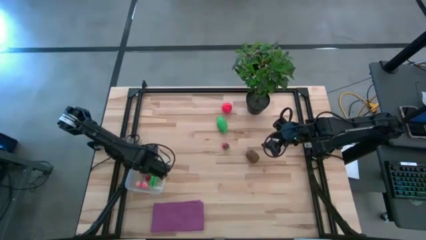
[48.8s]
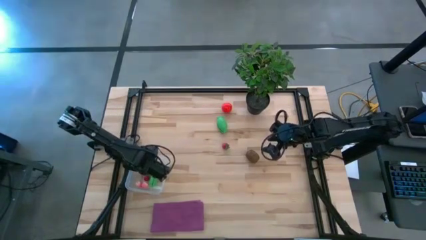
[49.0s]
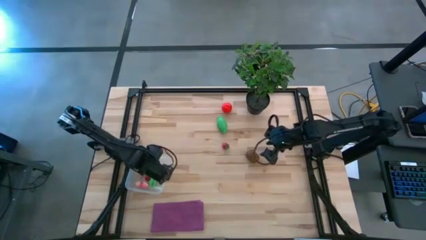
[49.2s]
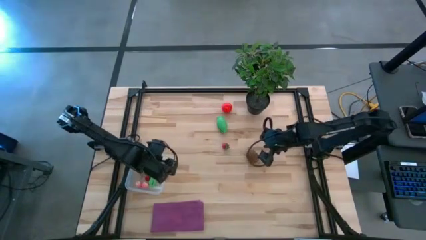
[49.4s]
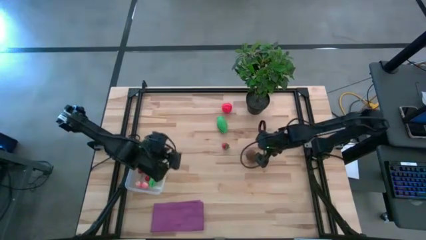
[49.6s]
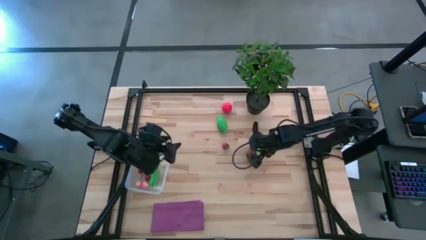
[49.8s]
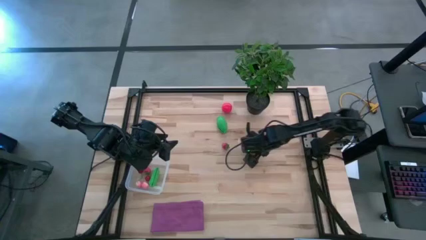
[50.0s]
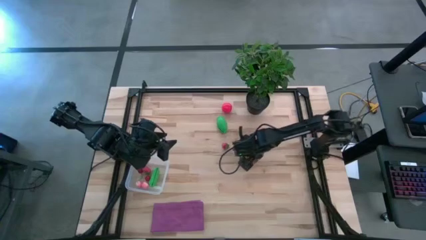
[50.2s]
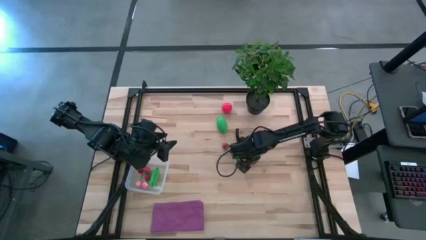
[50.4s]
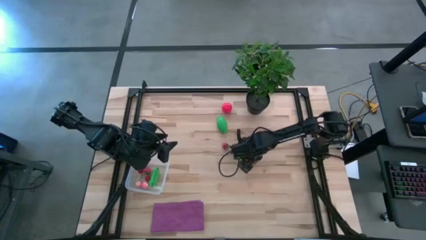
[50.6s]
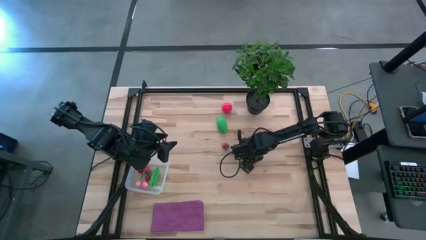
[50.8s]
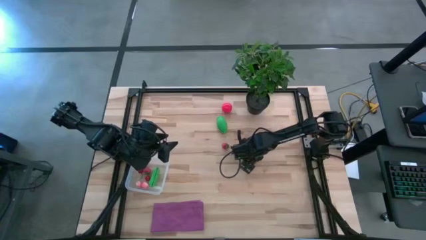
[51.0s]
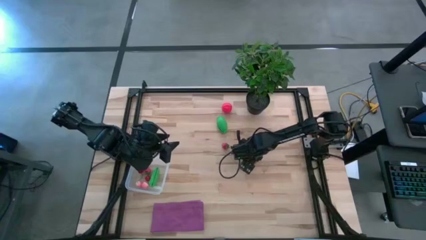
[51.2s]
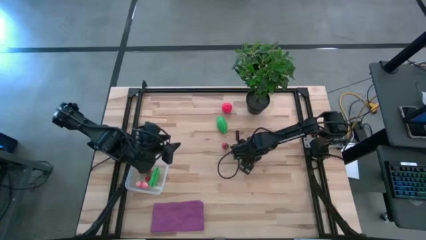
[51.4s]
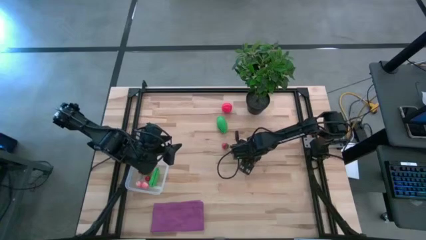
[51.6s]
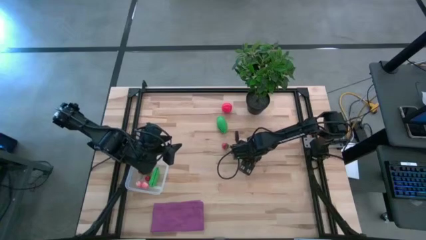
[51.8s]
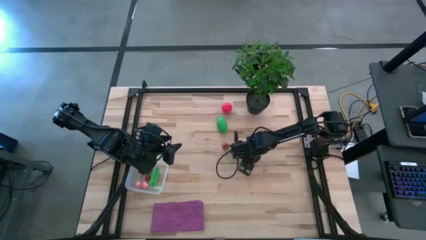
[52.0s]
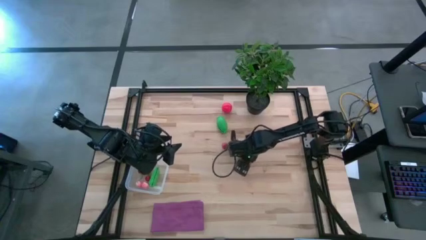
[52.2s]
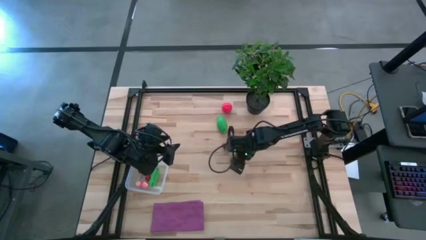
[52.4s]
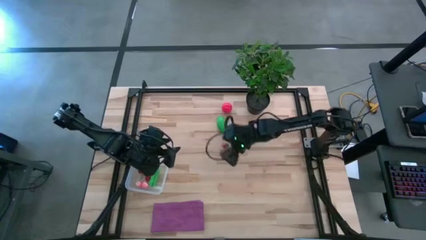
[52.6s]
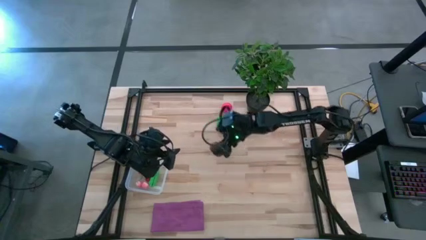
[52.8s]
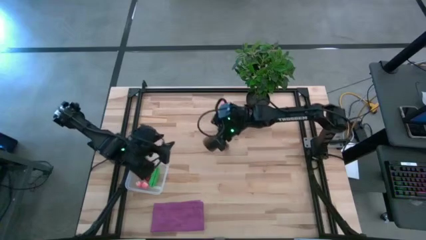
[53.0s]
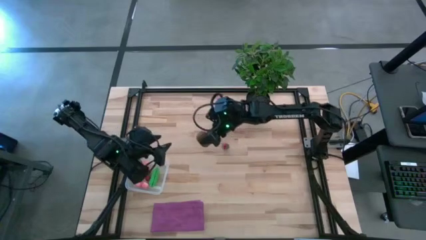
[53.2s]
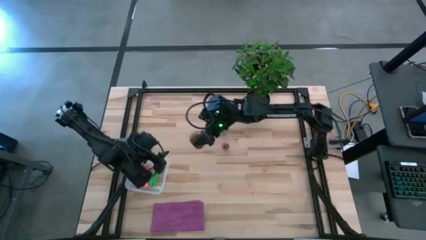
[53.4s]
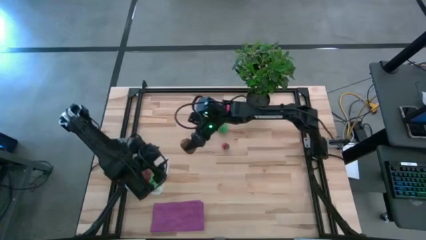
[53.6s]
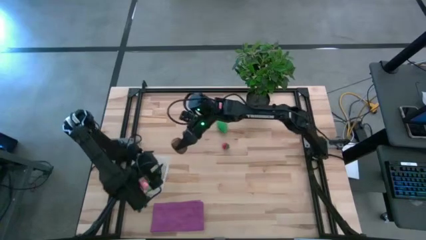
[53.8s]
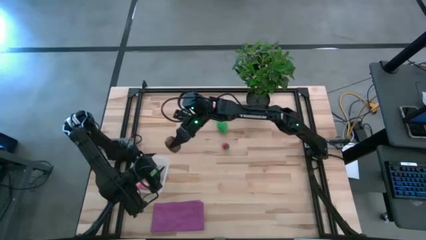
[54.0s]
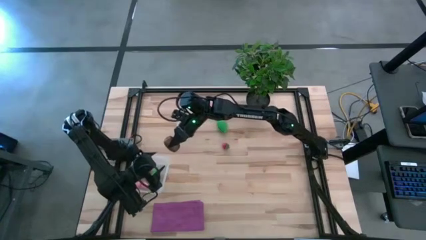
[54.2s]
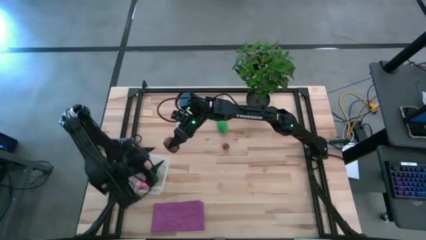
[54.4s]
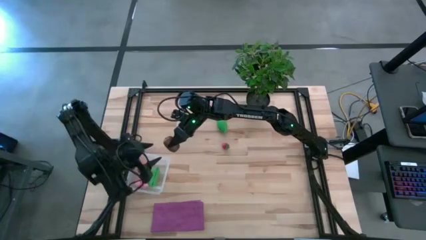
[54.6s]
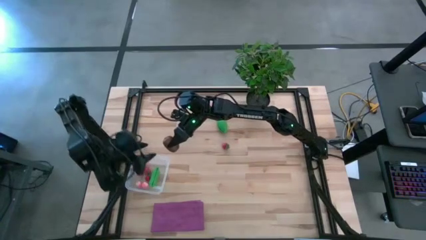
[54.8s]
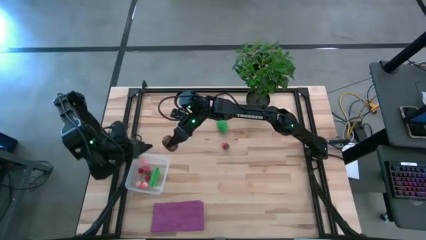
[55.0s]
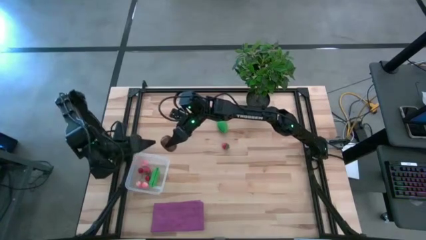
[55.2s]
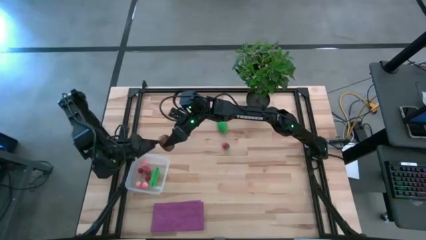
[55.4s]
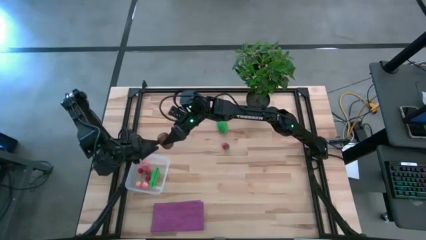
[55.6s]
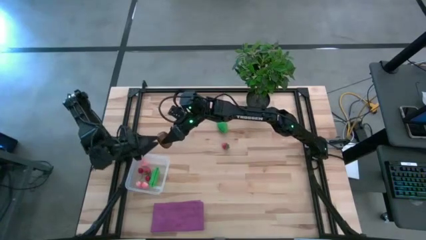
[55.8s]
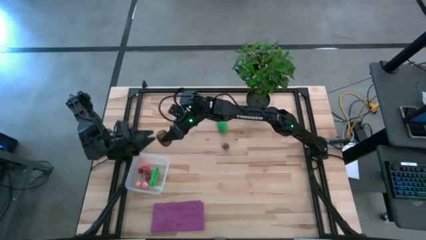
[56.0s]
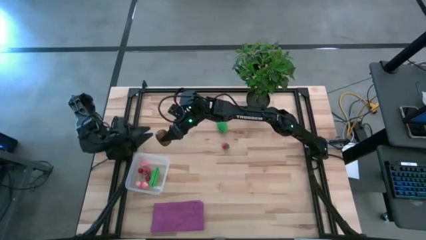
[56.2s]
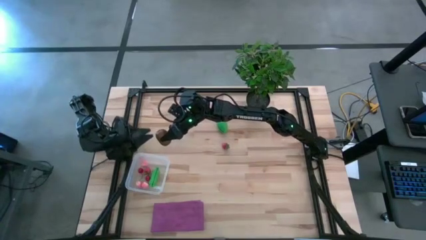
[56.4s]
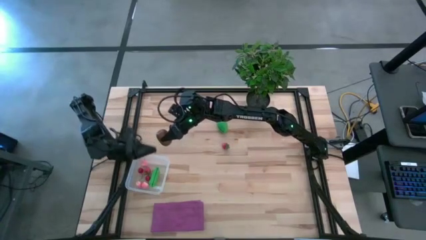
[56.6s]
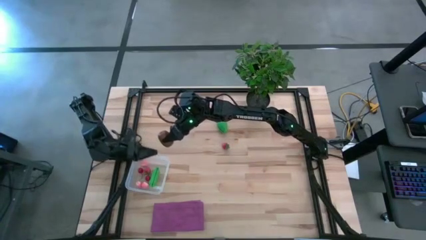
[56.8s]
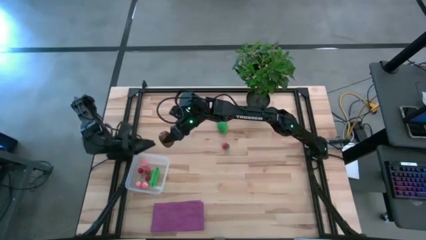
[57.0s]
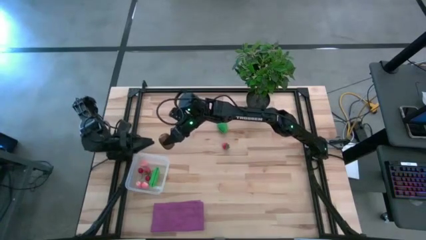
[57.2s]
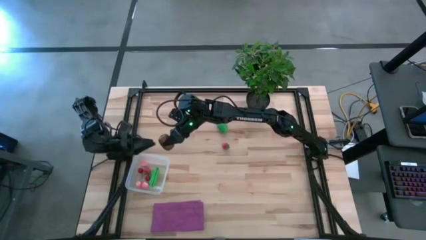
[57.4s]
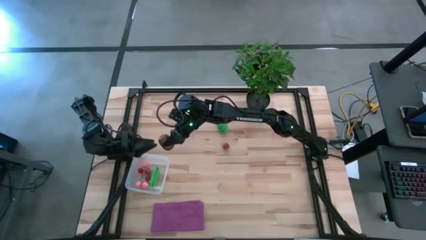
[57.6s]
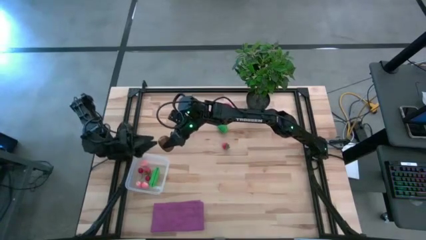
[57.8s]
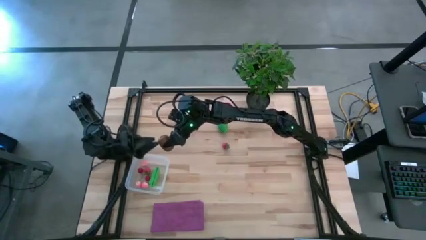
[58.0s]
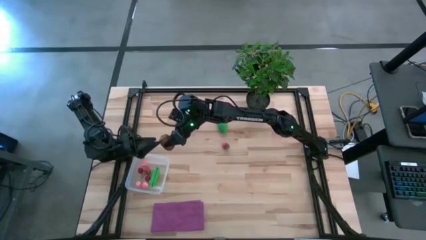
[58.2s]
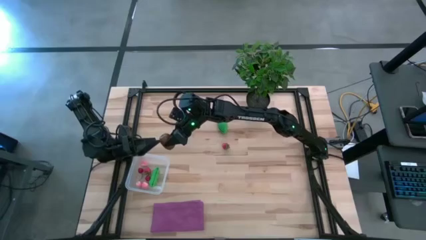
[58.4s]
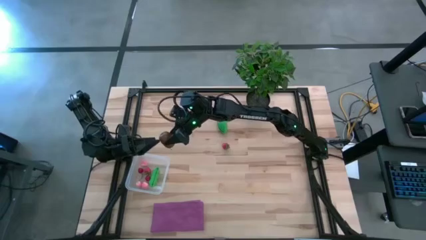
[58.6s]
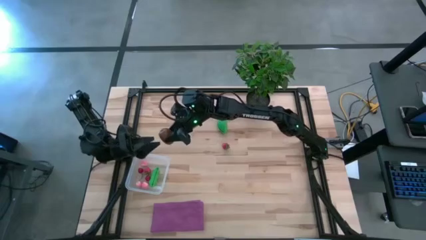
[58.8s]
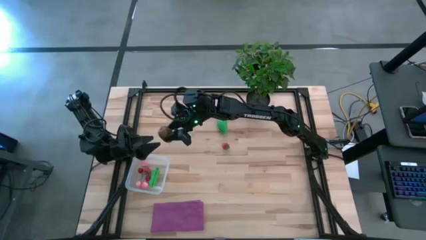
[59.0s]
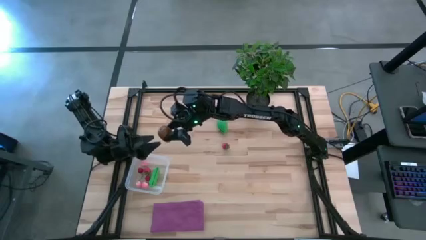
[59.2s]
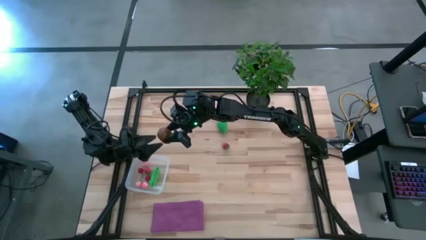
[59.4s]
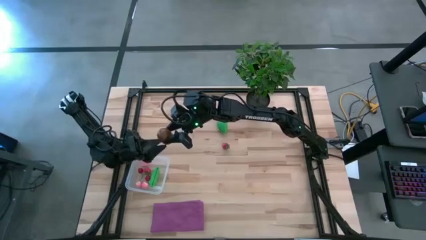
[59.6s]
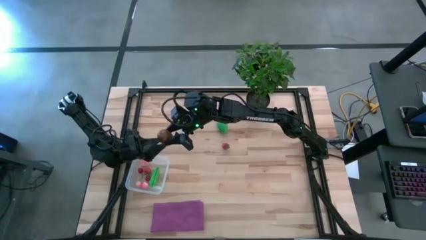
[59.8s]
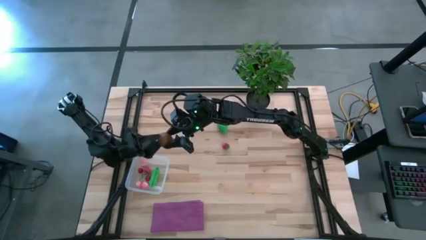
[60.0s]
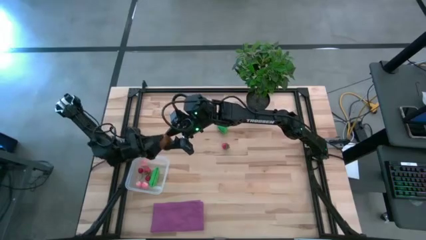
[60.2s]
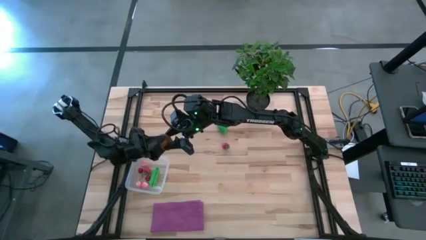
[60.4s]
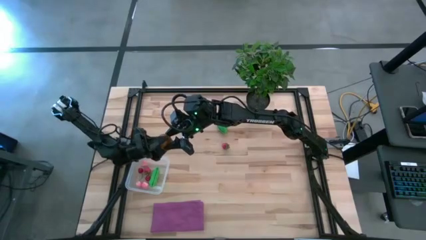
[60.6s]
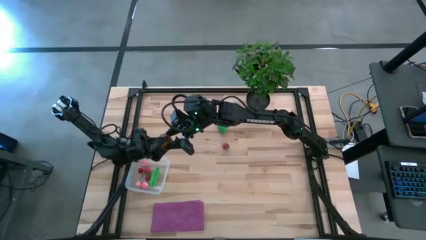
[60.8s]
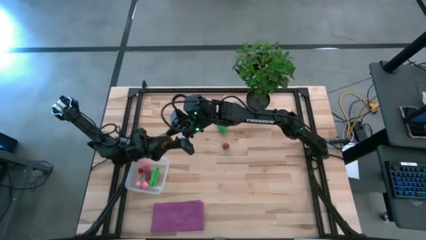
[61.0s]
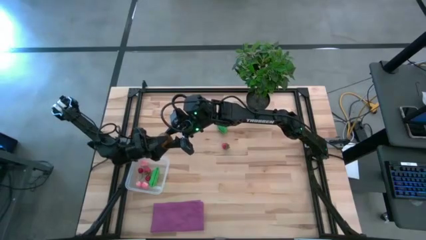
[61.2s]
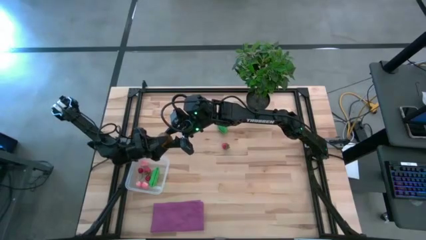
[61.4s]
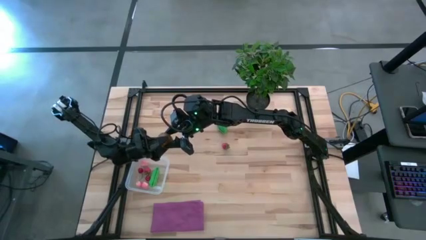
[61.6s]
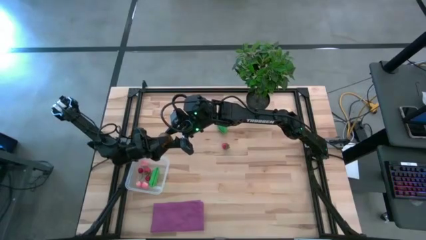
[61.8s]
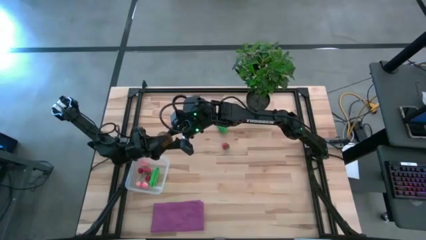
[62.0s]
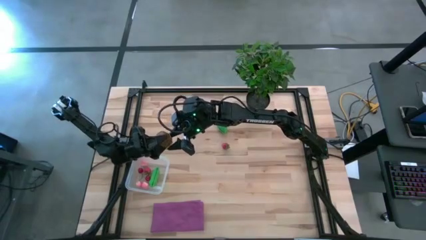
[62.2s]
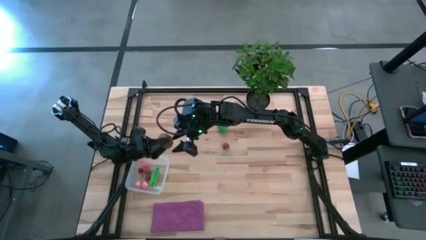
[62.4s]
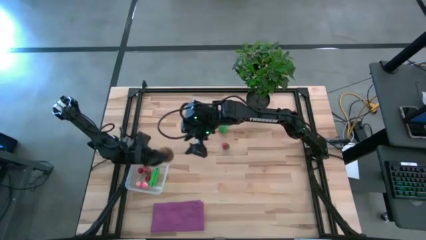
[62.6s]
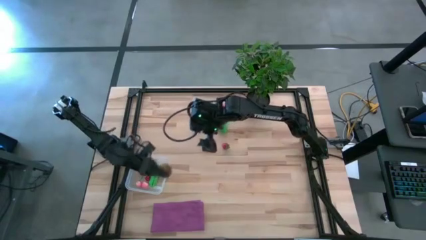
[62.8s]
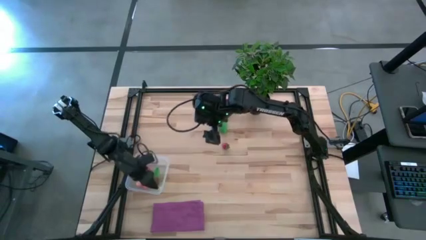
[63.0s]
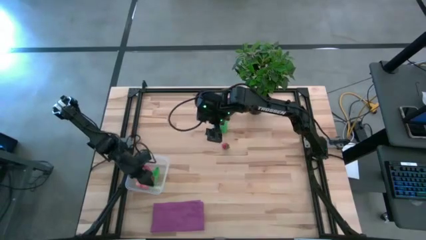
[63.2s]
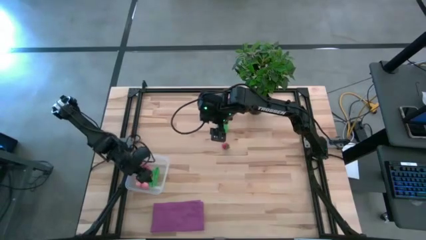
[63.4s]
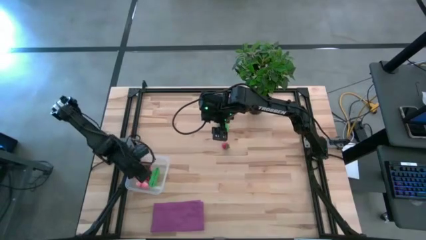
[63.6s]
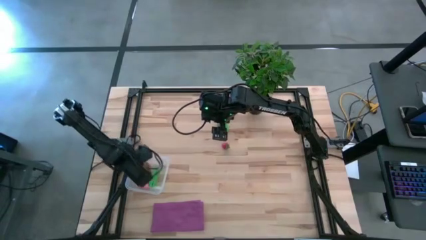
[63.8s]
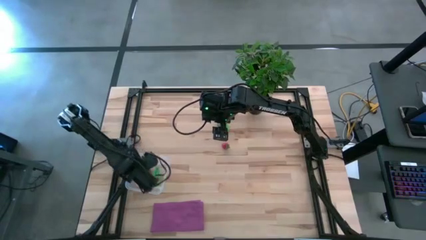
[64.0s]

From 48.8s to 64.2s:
Task: Pick and placing Produce into tupperware
Put the brown kiwi into the transparent container

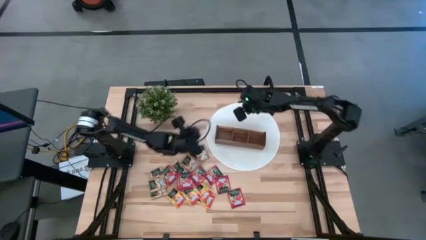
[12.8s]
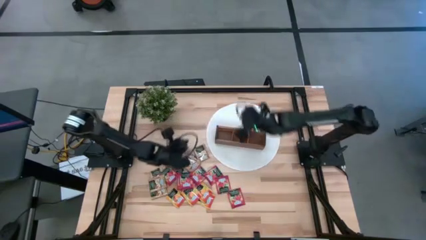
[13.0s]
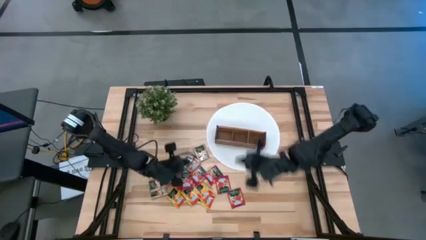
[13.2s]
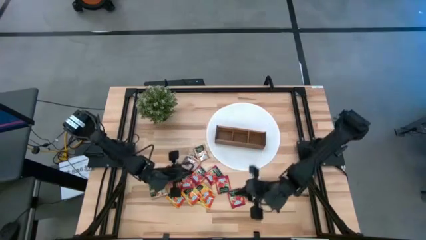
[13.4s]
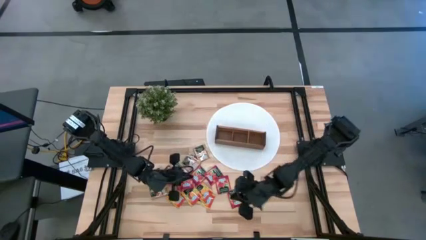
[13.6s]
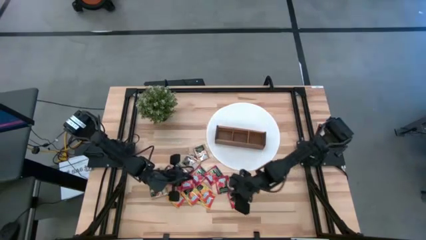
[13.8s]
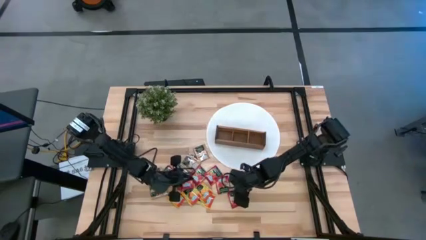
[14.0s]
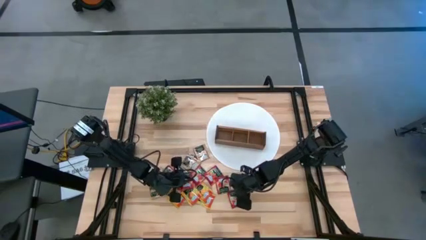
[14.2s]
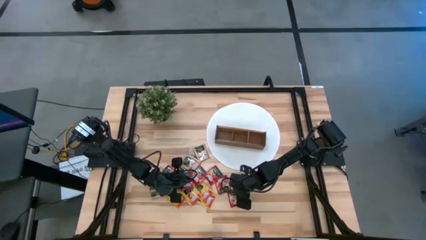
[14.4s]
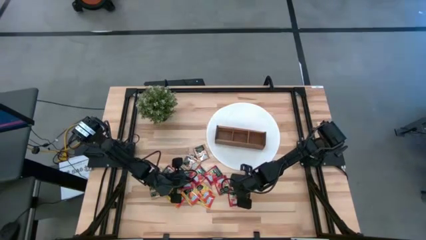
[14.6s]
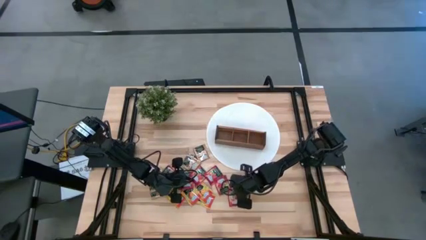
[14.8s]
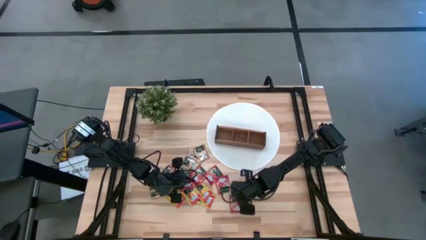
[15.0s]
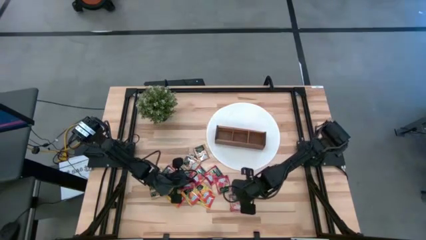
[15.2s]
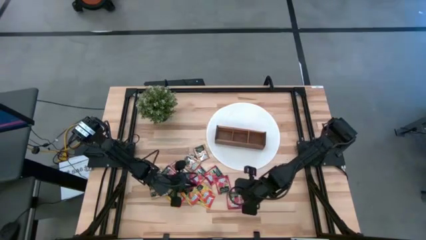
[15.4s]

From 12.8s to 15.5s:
Task: Pick & Place Tea
Put the red tea bag into the left section of the wooden organizer
